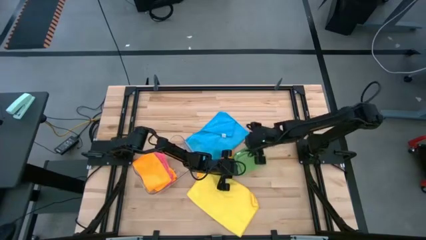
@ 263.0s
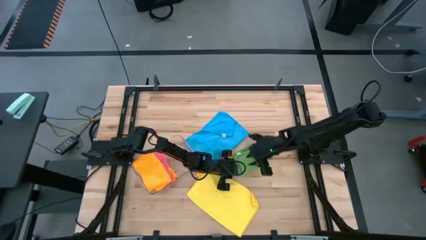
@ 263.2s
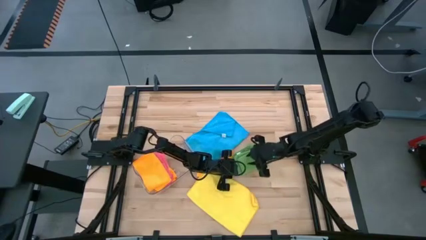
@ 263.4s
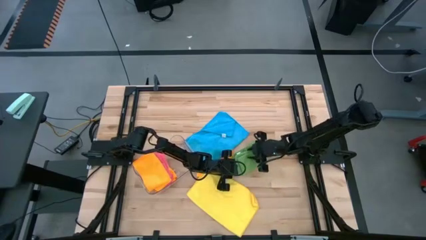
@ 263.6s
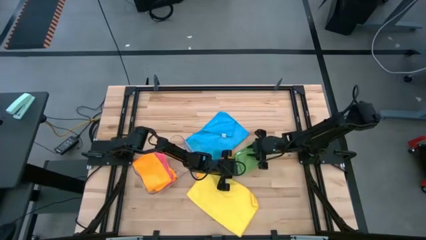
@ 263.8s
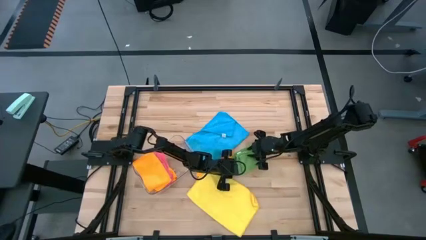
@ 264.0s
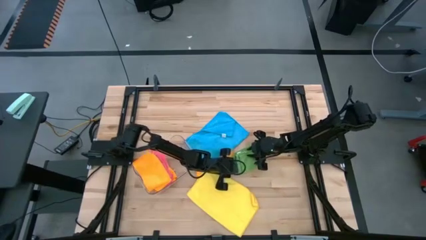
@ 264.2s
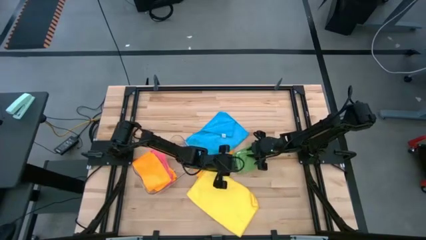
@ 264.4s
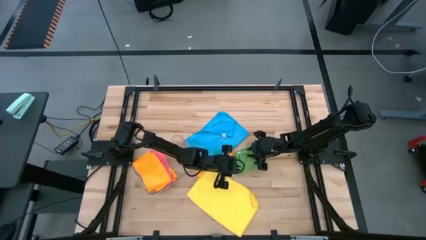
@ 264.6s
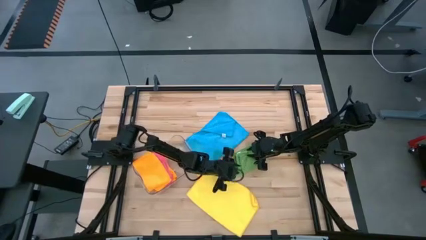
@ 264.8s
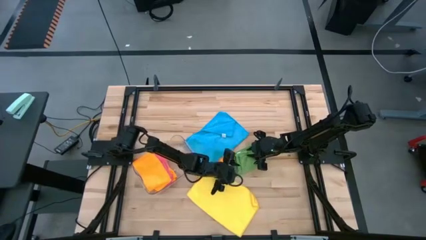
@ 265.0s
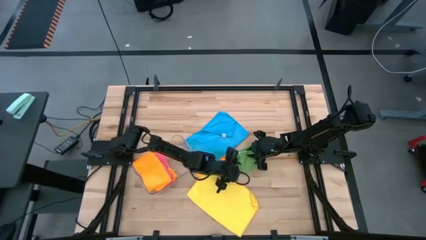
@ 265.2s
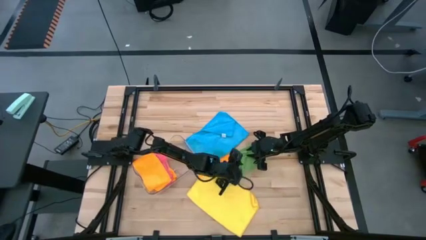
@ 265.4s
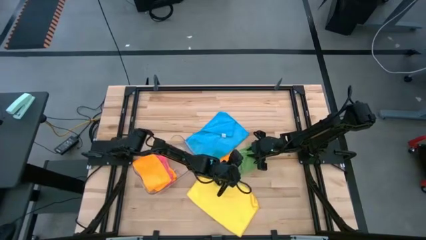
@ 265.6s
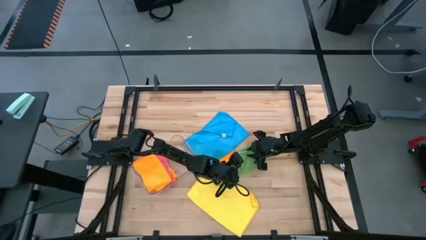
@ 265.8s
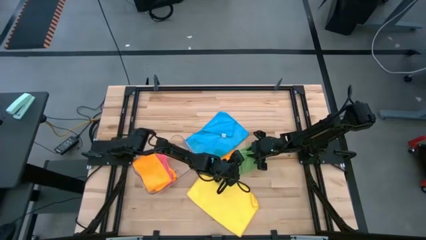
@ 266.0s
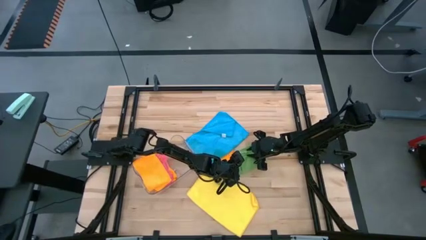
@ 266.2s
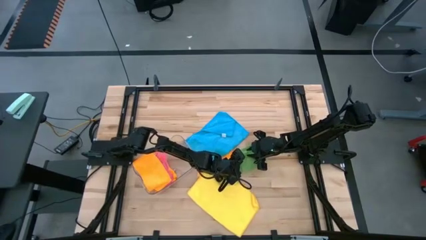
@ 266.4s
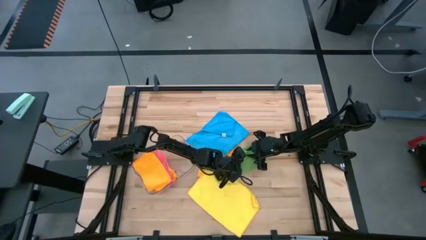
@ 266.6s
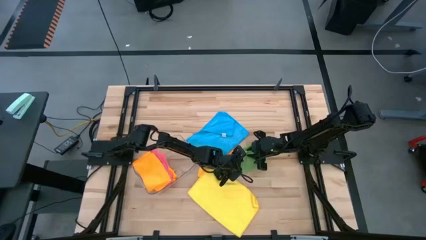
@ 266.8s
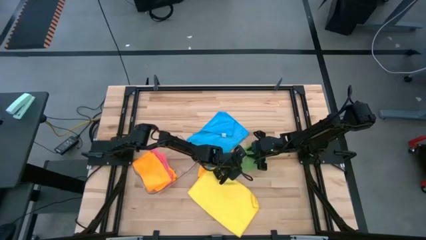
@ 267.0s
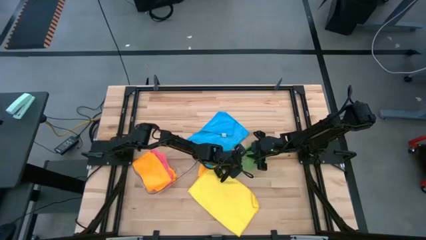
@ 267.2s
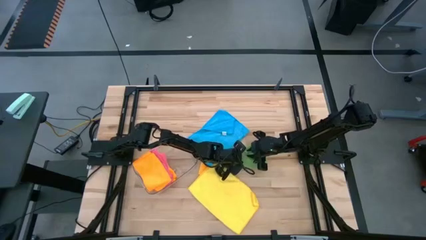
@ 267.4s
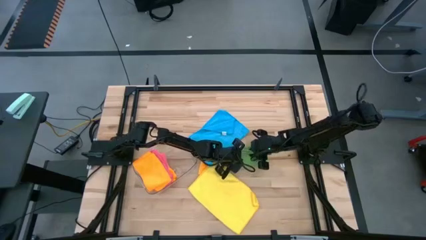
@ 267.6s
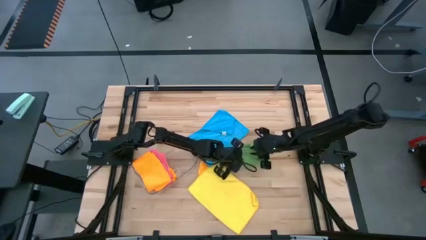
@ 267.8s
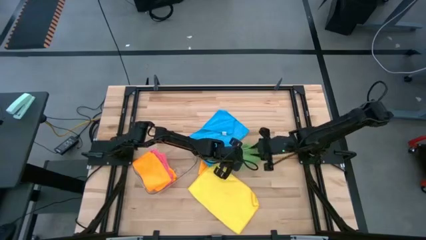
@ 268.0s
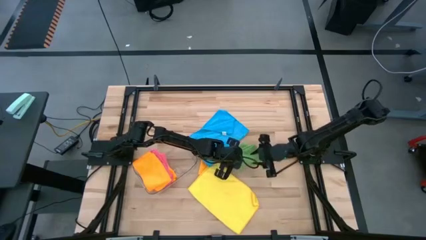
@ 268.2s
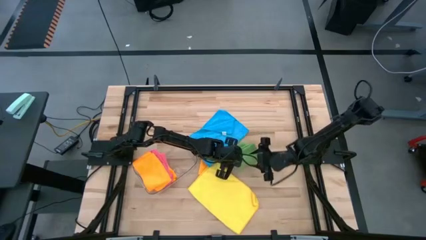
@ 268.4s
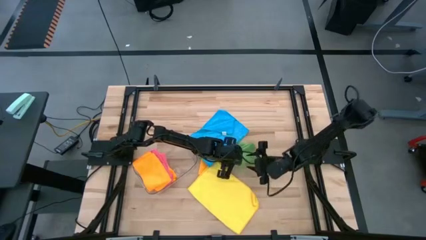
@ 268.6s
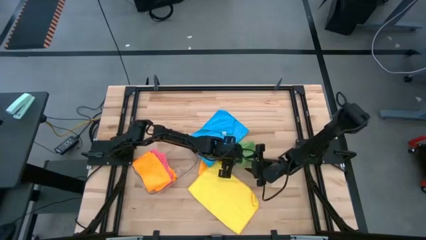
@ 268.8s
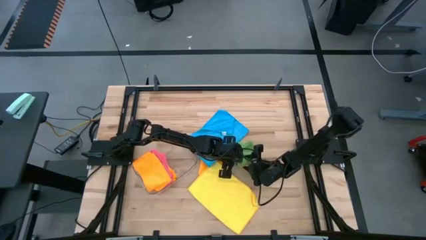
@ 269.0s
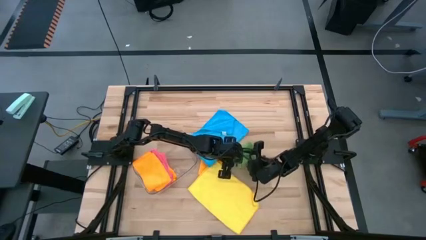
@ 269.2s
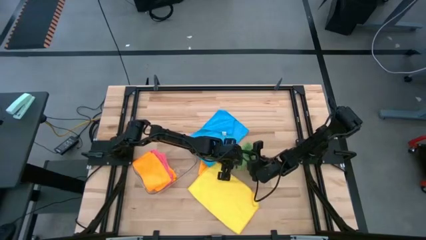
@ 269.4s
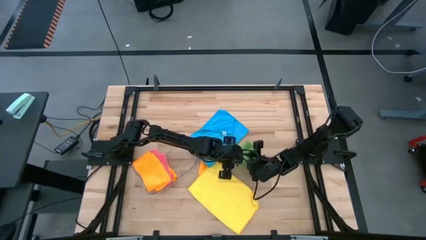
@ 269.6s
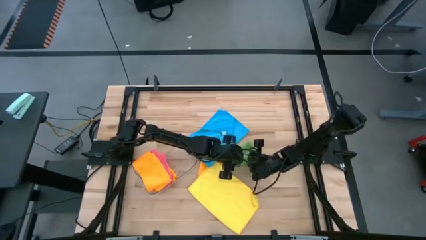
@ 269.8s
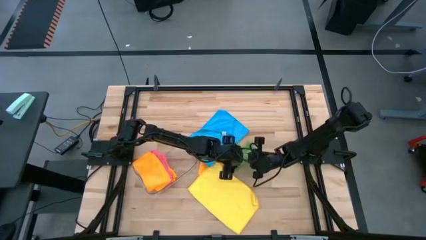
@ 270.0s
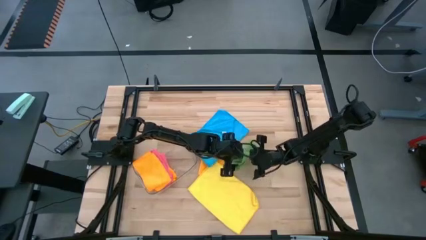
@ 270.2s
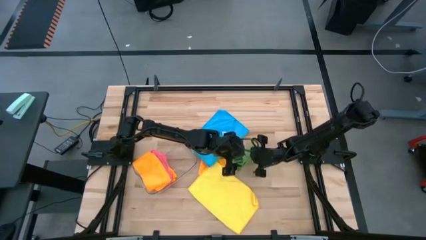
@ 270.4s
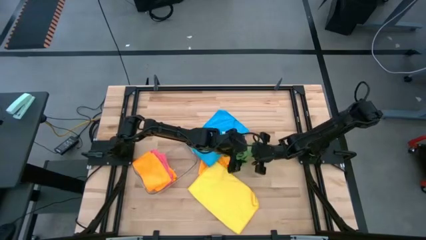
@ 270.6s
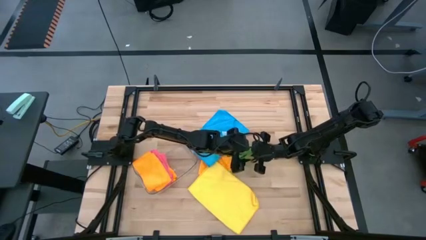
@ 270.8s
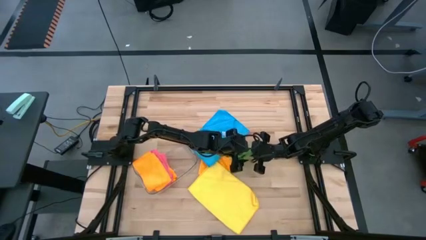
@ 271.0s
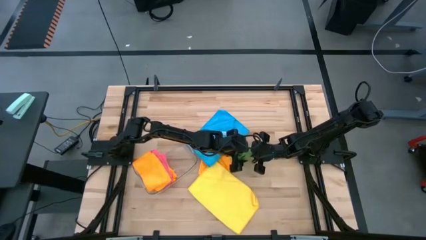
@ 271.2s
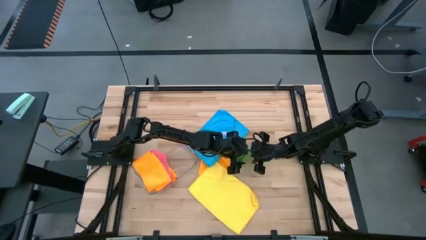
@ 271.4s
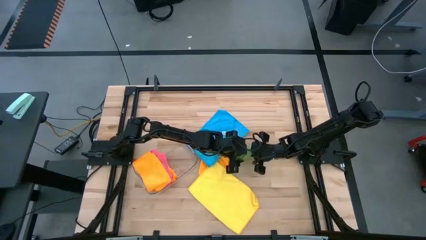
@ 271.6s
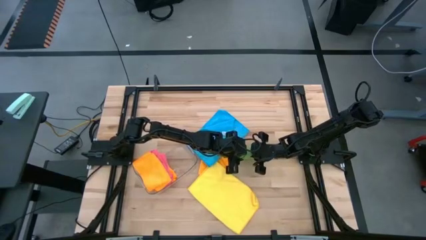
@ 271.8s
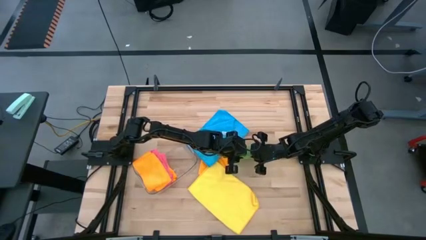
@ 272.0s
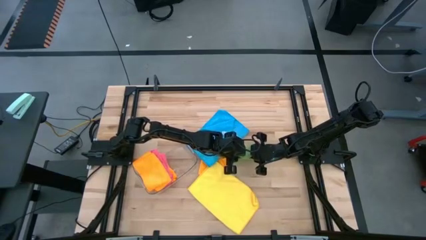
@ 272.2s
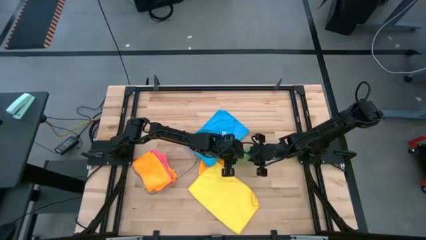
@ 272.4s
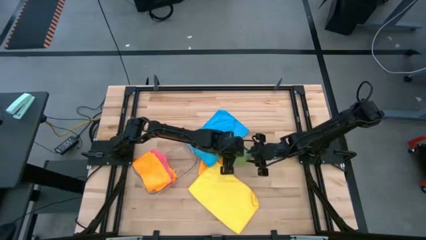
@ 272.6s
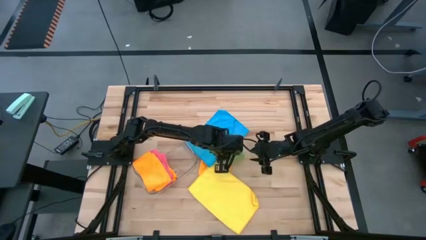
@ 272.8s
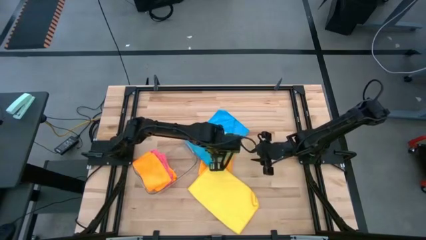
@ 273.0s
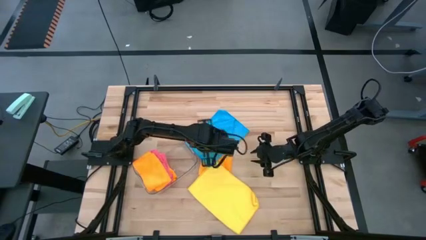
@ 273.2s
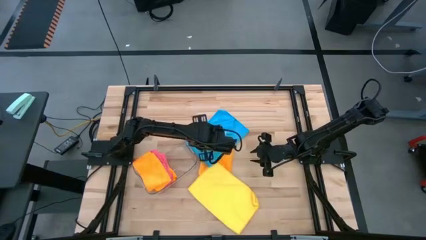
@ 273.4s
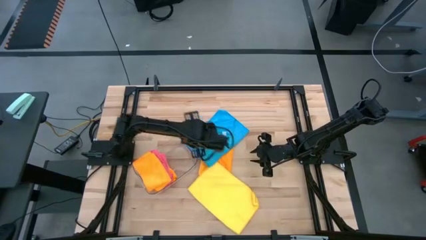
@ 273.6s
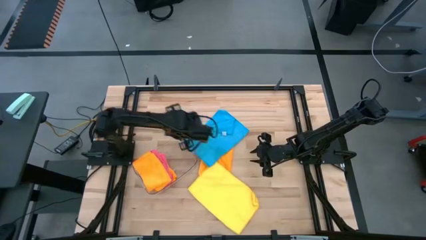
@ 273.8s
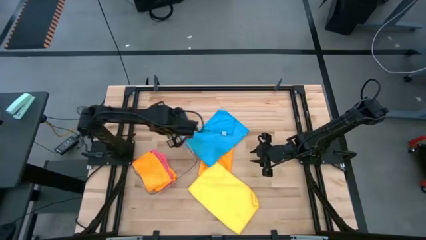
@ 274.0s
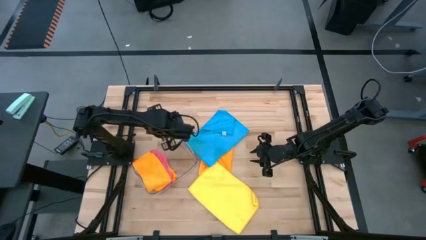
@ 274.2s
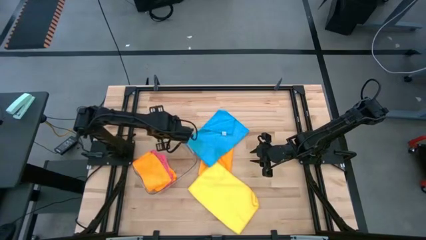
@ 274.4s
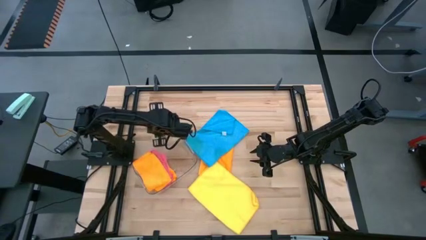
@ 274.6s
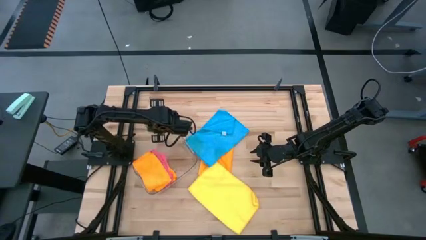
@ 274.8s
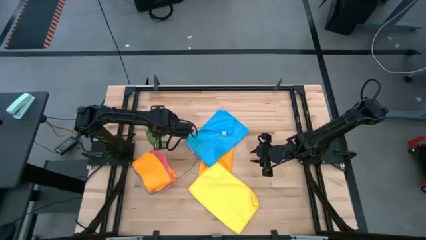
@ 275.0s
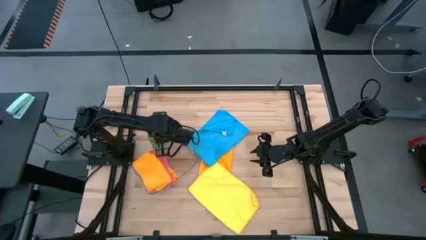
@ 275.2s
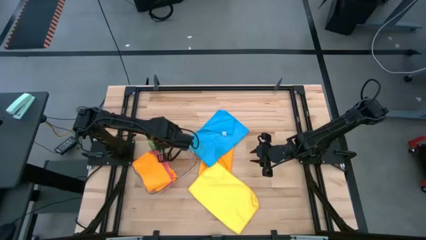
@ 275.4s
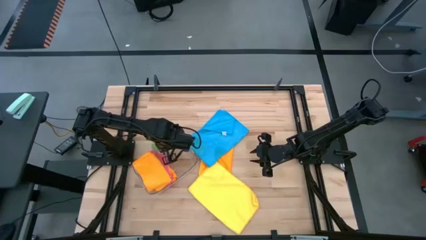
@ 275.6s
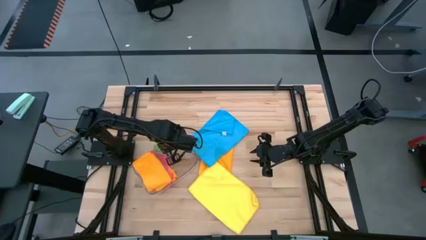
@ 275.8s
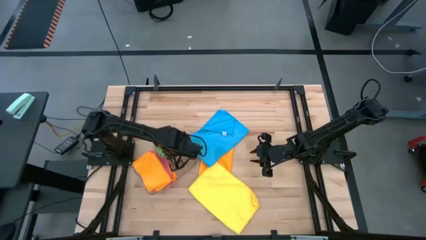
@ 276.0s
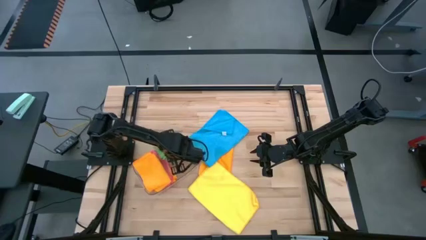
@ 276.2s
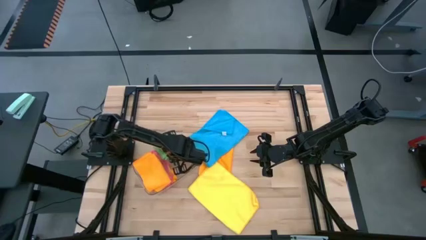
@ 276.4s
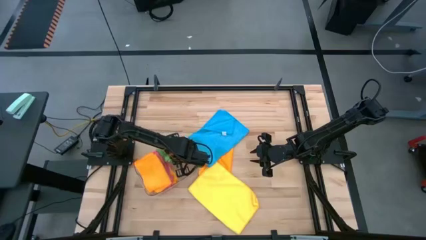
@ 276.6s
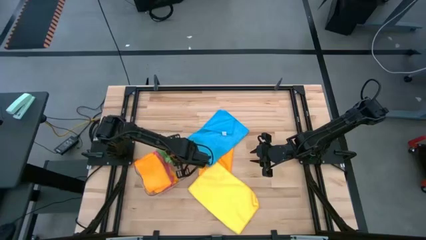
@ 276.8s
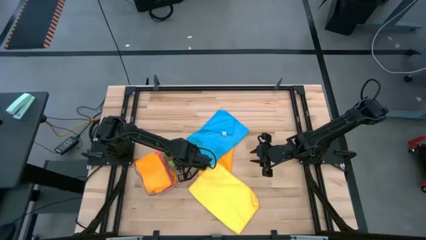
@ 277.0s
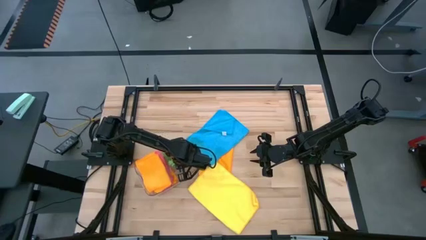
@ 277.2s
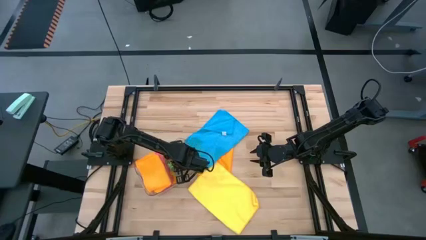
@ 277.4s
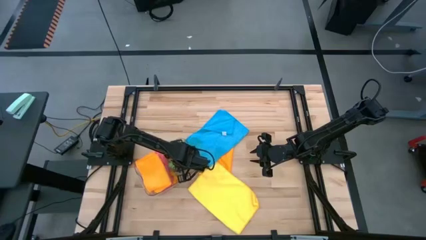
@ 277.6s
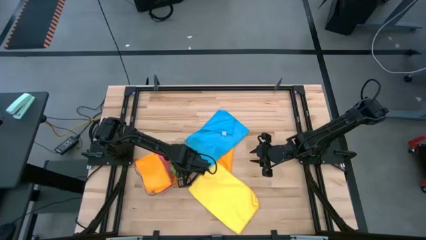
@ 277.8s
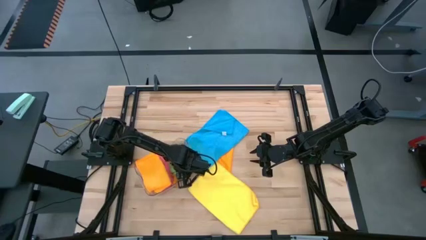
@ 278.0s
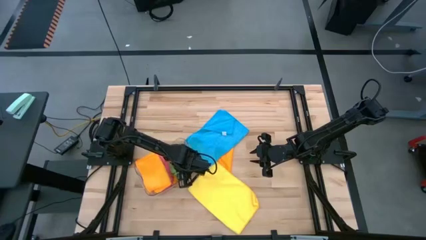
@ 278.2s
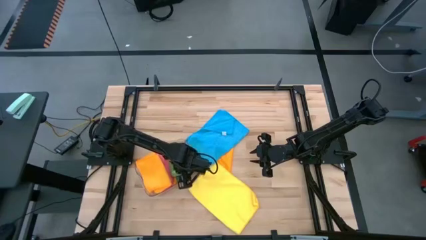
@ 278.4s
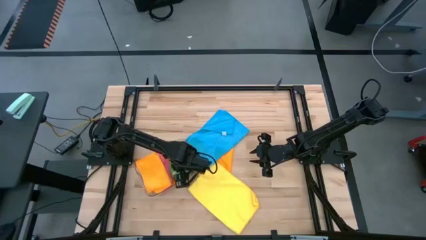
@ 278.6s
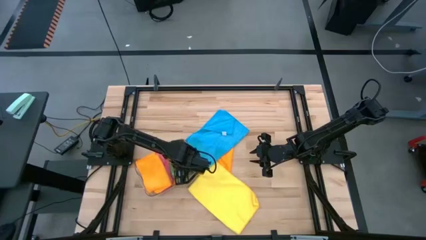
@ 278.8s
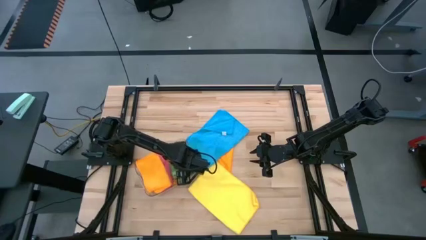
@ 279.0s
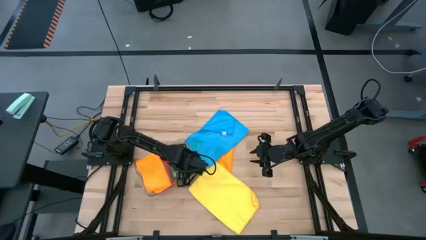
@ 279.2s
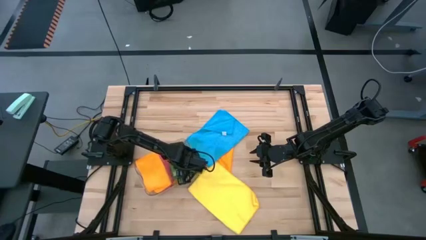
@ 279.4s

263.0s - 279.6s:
Task: Fold microfiber towels
Put the folded green microfiber cloth into the transparent bin
